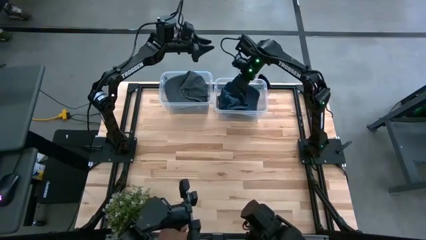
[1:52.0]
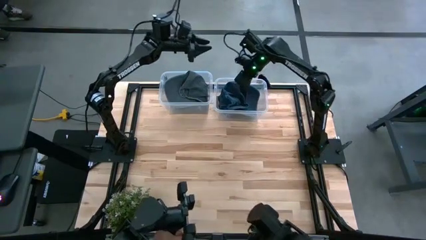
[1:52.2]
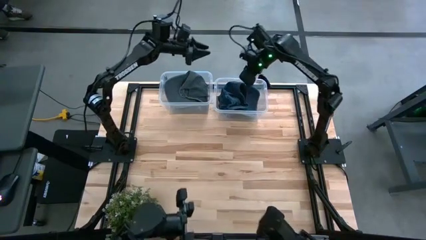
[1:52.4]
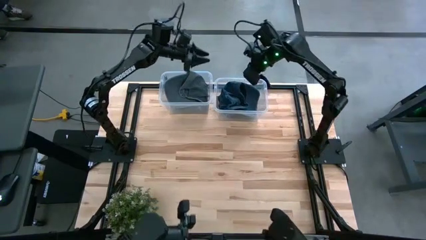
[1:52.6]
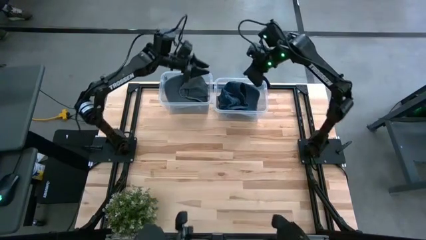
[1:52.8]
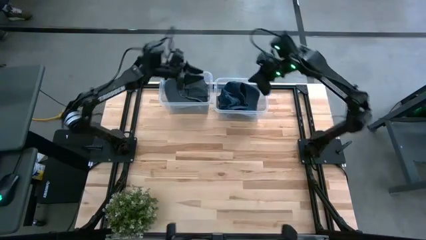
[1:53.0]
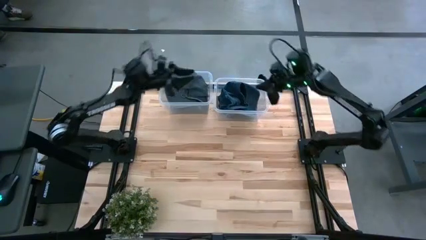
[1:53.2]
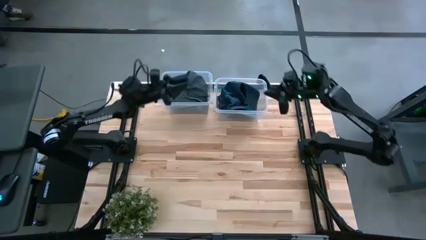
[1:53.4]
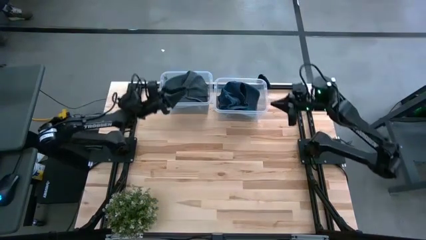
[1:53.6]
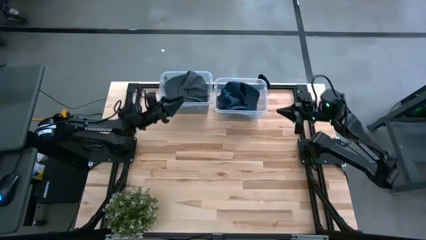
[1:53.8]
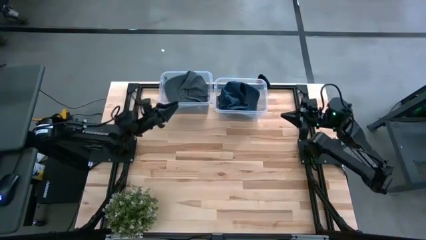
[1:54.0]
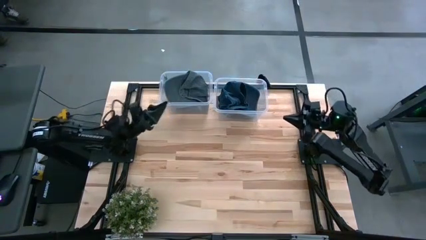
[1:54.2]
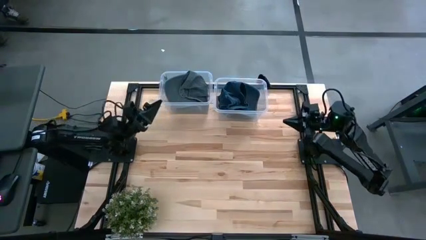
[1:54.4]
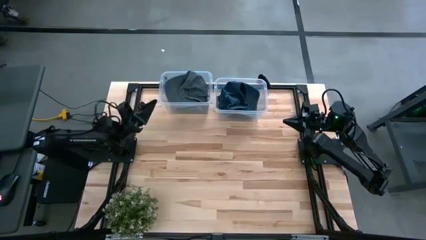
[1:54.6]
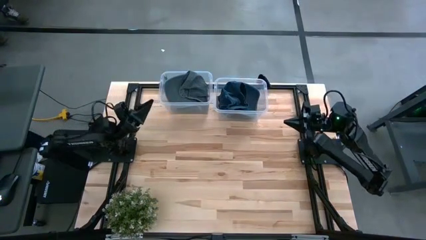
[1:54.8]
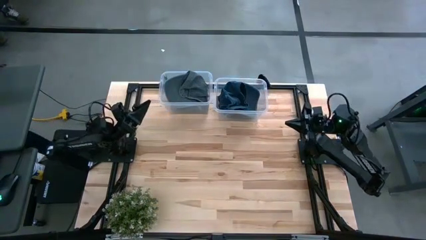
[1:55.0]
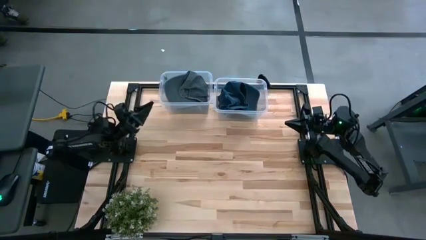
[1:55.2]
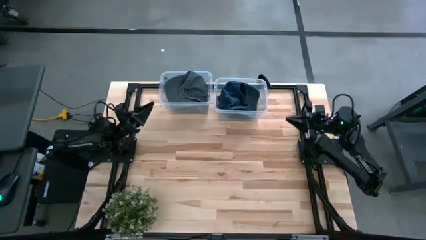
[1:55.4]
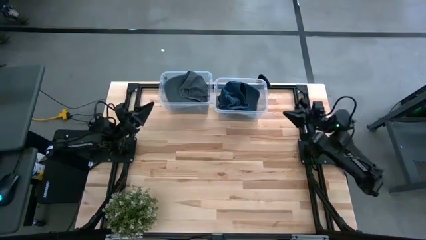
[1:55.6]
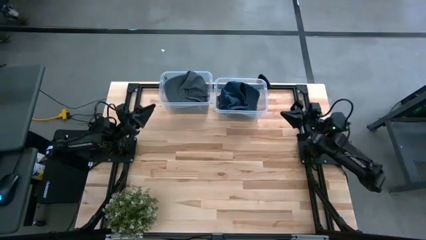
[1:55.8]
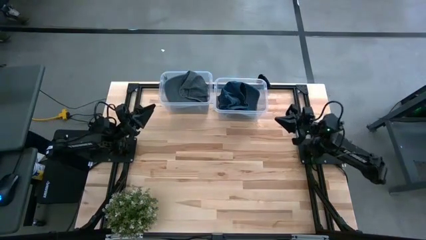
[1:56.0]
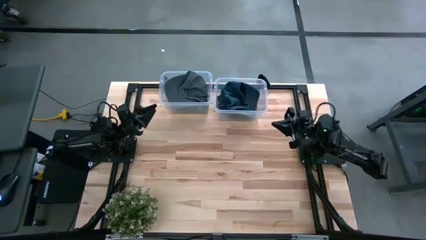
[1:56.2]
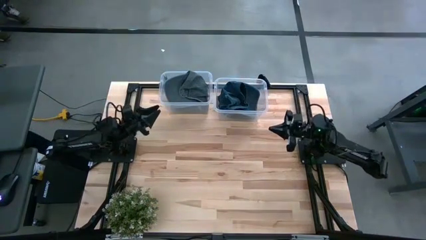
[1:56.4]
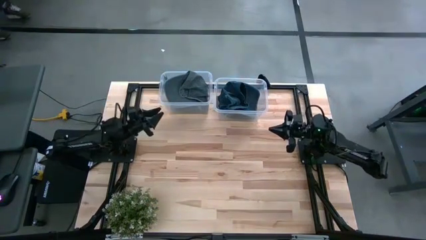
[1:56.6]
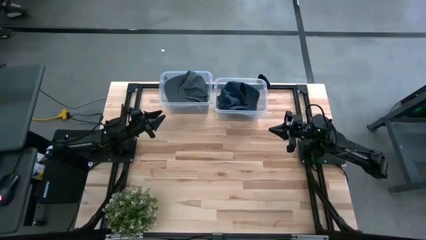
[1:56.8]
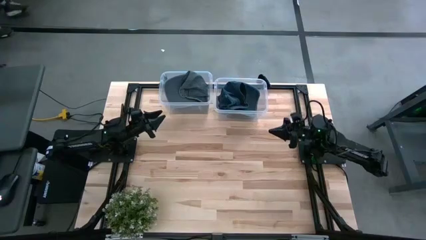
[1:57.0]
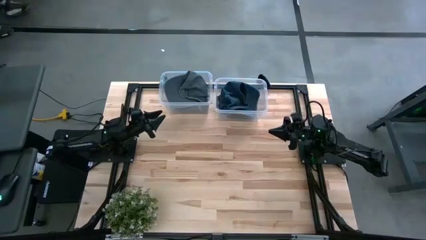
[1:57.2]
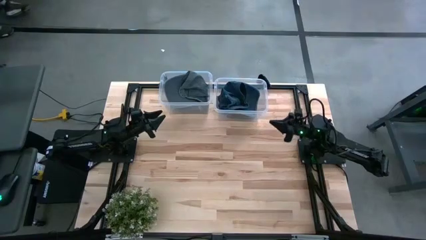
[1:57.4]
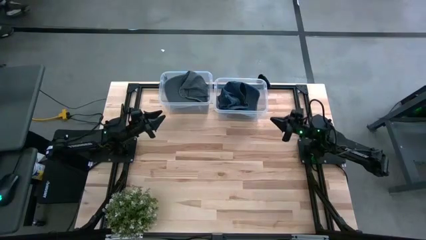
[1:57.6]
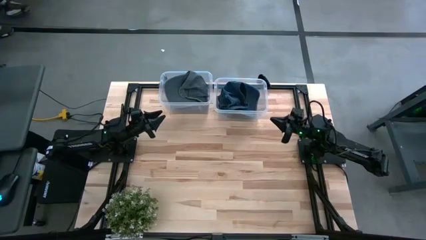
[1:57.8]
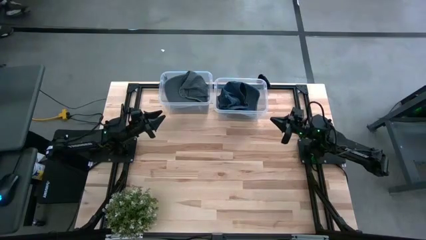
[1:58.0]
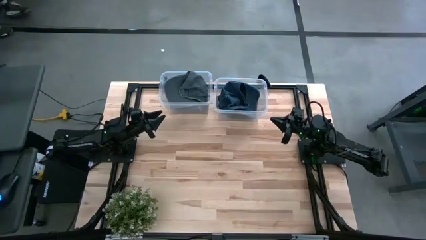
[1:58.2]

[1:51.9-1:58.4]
Task: Pick & Place hat
Return to Home Position

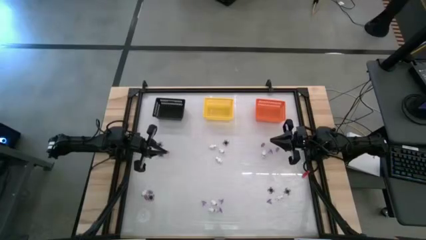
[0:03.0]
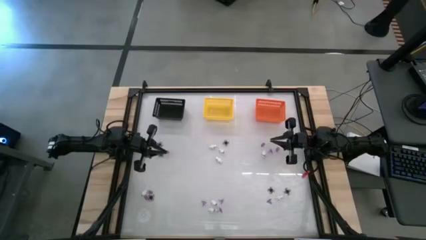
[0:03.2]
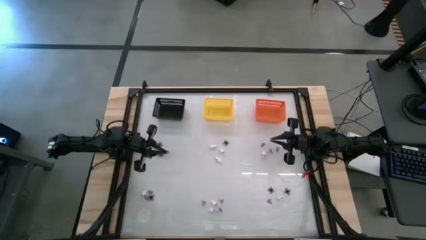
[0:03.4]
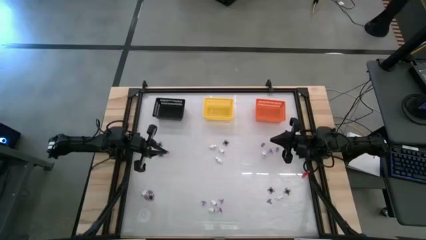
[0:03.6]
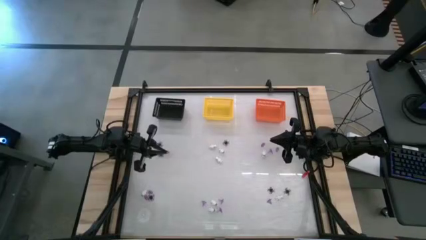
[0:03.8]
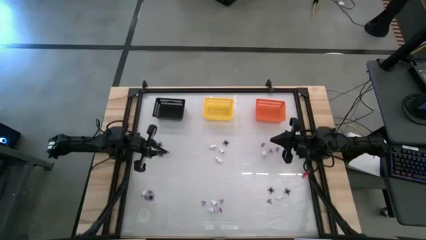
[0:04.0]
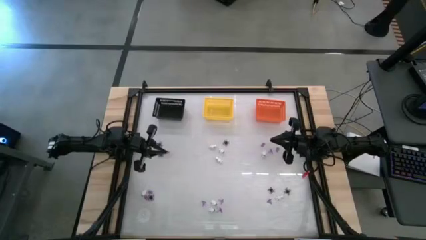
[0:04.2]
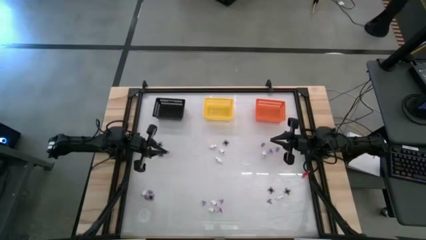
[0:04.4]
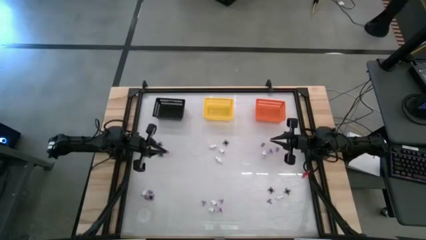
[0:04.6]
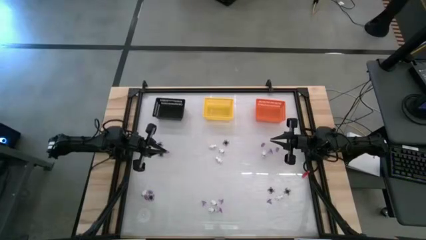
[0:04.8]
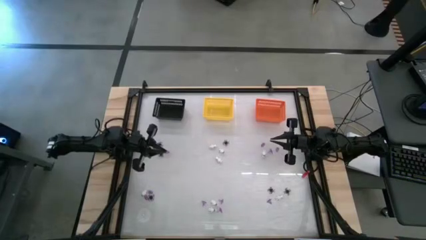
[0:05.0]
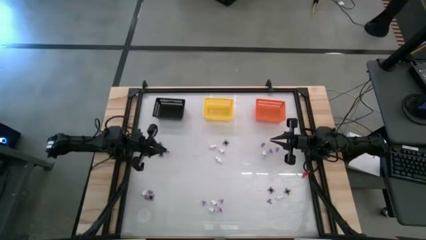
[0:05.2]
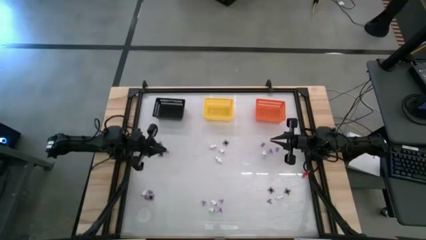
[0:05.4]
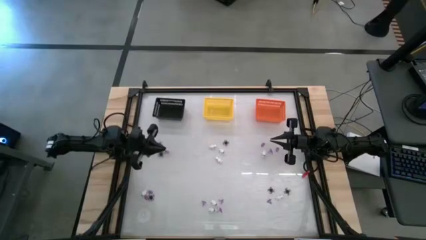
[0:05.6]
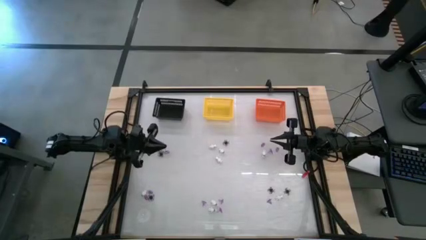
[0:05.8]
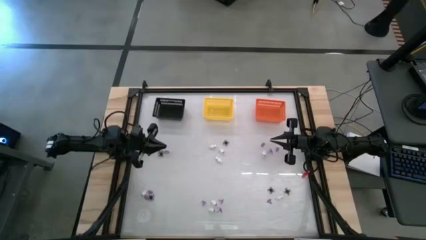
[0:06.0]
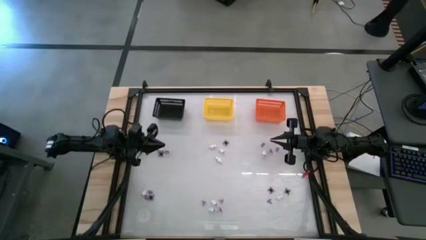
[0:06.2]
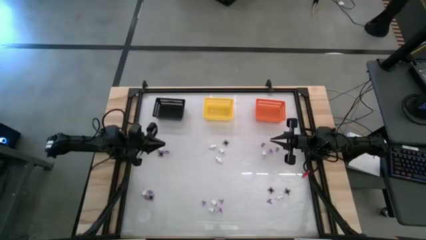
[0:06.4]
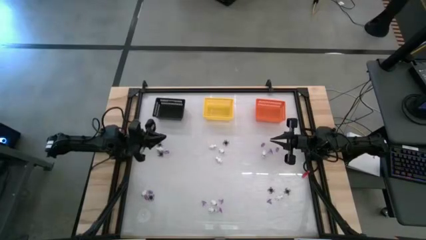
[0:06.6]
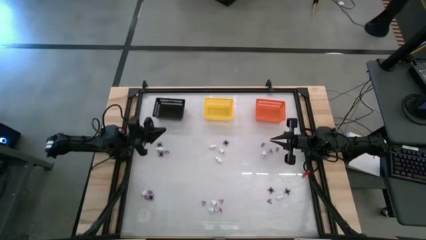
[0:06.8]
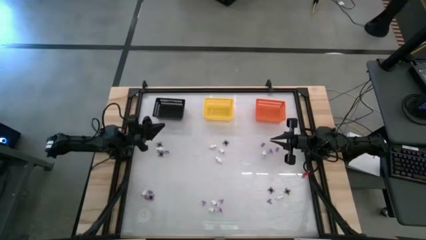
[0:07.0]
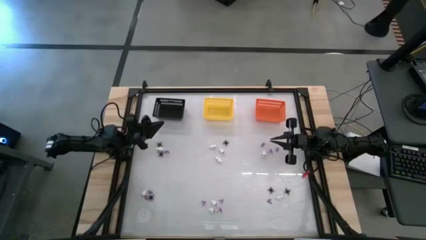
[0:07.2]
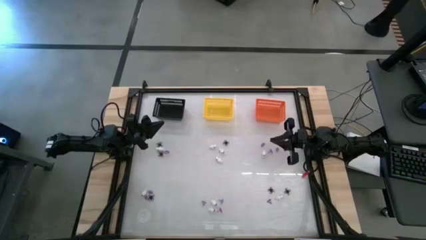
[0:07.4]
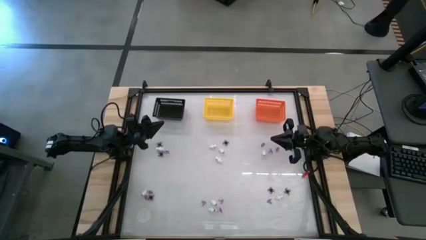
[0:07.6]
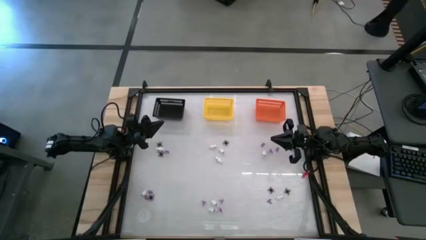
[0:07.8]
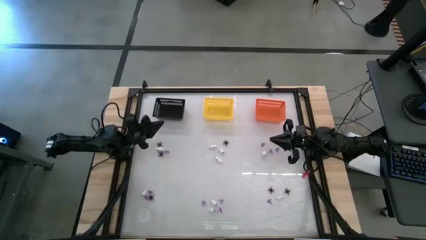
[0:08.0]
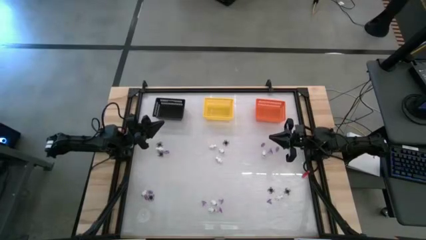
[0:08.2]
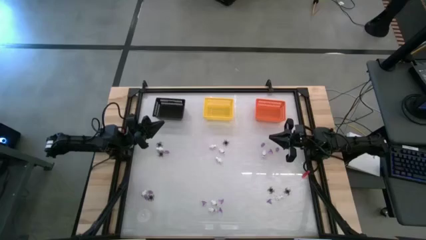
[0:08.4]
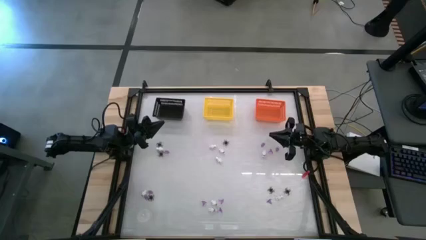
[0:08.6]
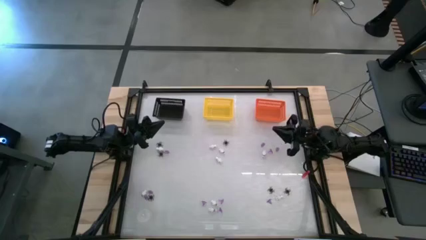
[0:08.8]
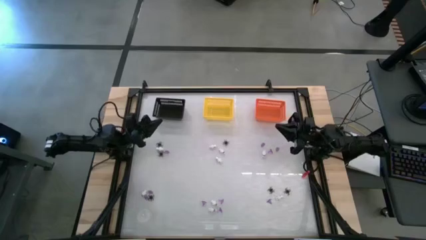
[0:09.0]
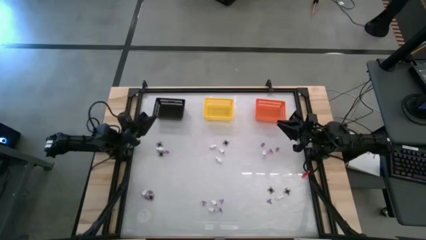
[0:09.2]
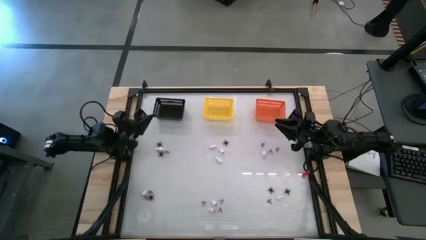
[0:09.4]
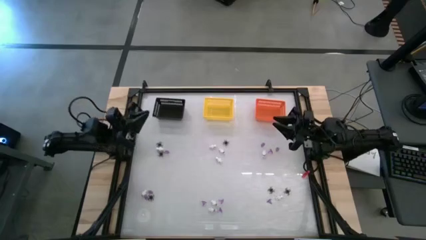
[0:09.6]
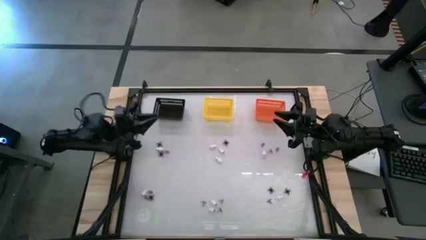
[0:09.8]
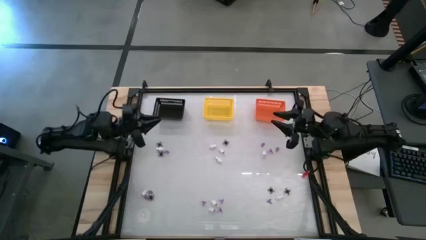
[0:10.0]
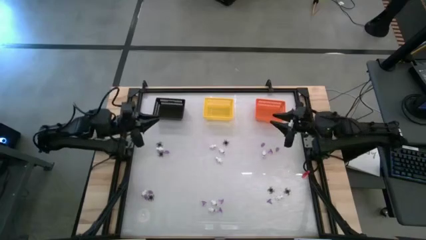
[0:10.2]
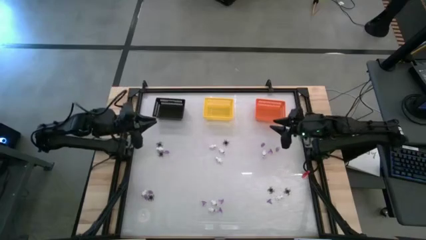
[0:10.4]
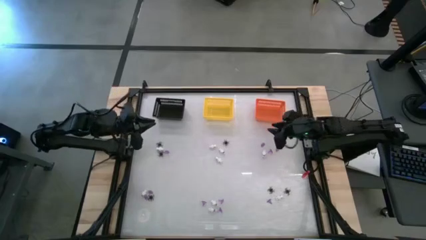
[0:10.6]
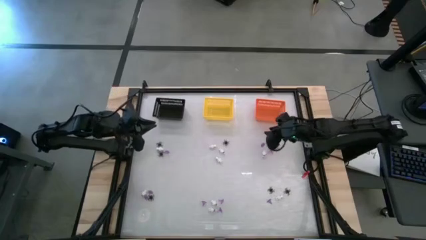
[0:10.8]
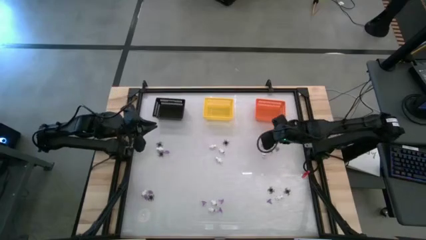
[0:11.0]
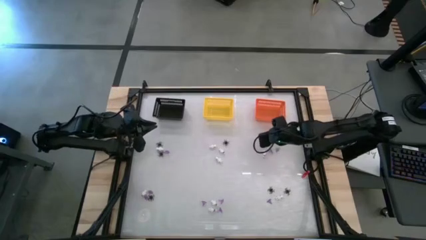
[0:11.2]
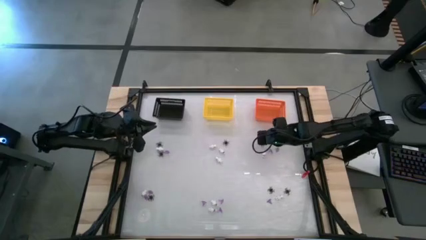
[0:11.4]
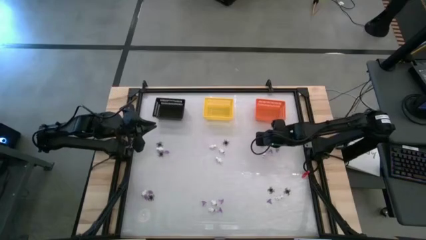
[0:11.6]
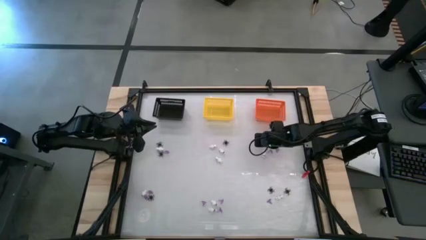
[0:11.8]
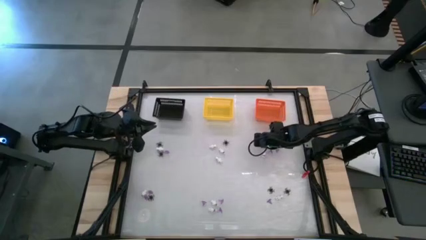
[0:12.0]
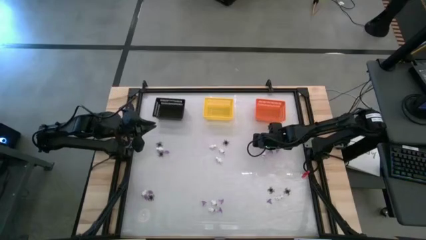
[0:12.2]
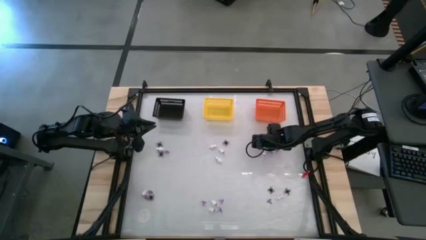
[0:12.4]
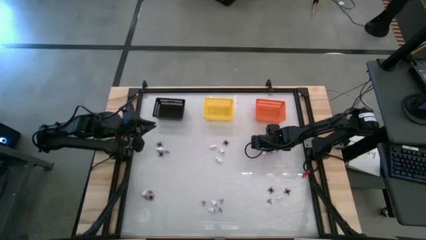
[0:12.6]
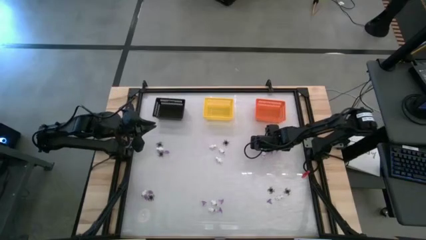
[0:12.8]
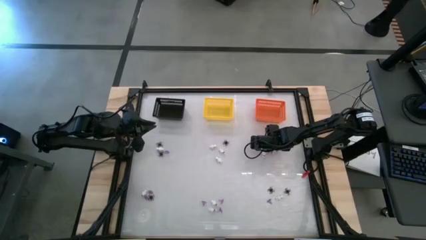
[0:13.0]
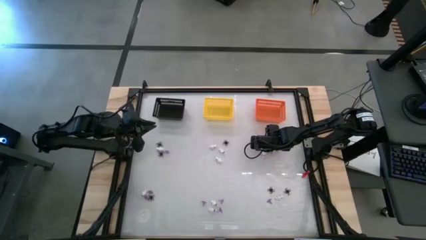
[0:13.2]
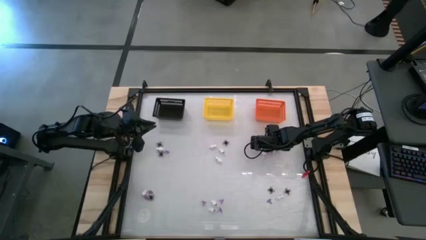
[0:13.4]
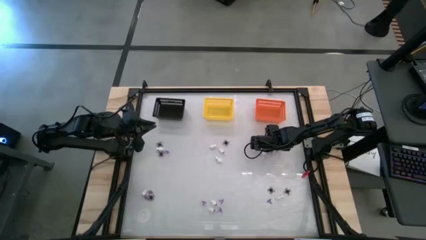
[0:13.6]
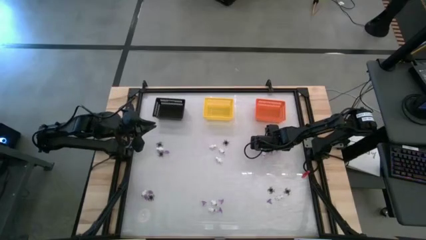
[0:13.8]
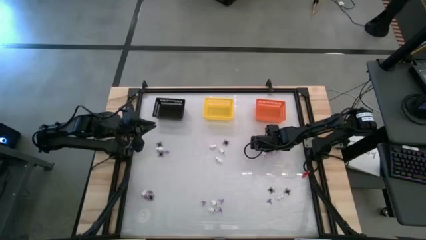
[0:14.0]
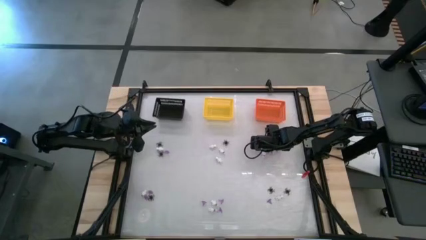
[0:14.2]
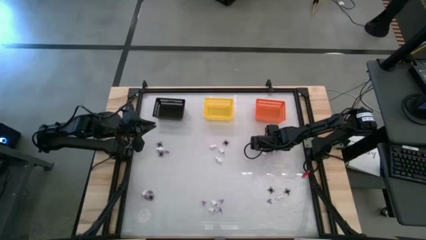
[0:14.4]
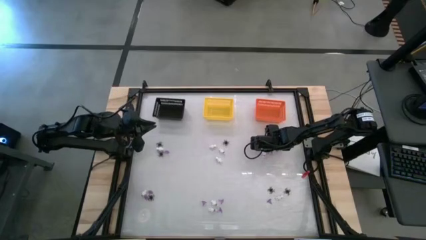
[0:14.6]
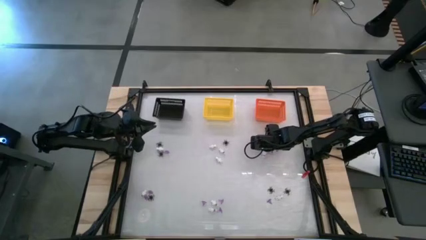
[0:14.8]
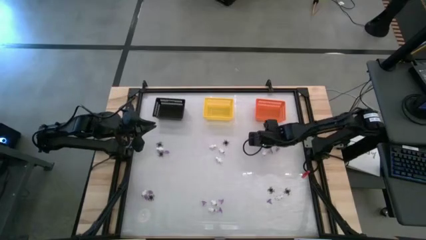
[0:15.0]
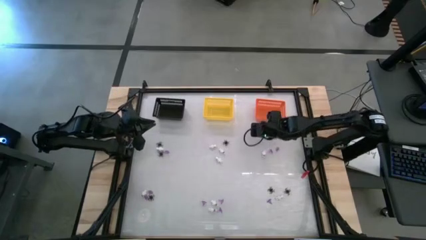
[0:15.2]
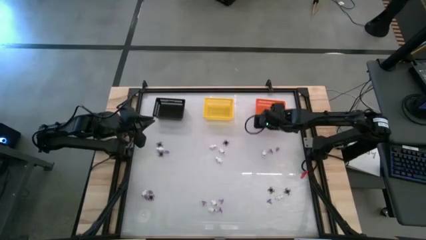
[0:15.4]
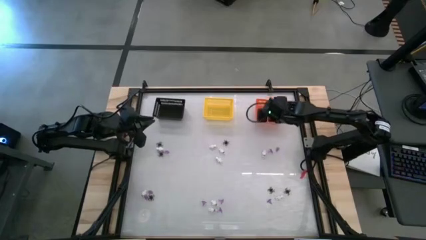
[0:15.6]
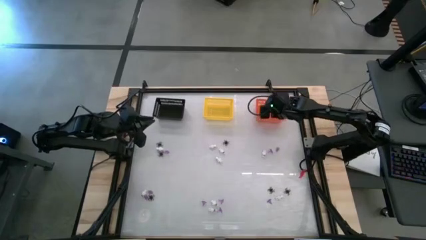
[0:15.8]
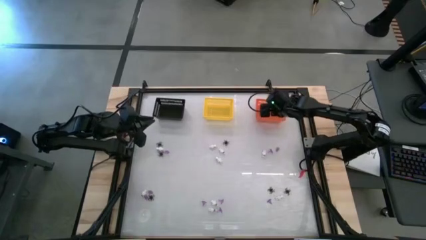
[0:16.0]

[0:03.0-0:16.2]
Task: Sort Halloween decoration
Put the purple witch hat toy into the orange basket
